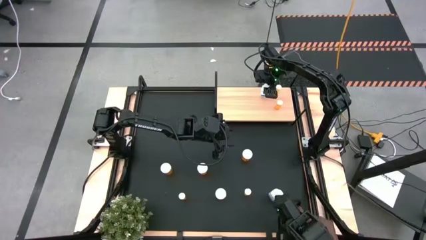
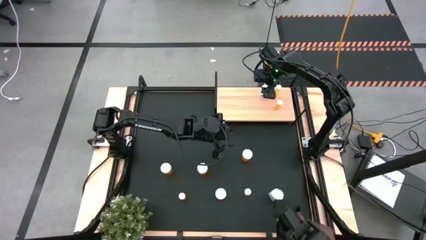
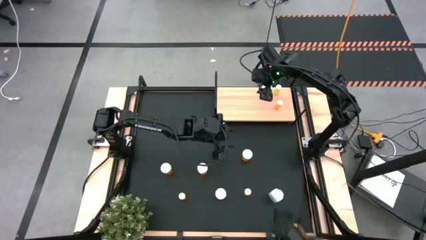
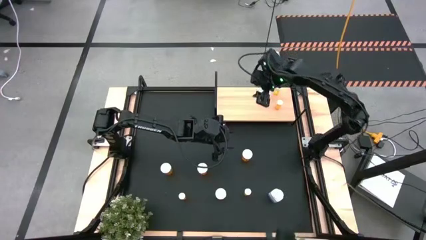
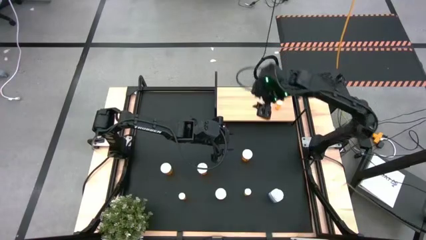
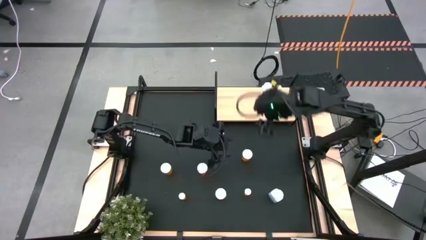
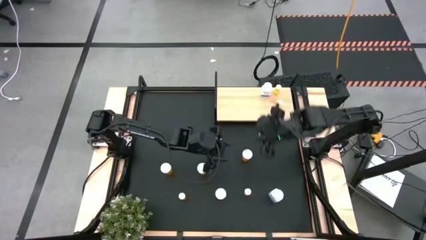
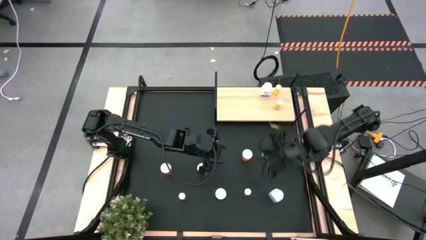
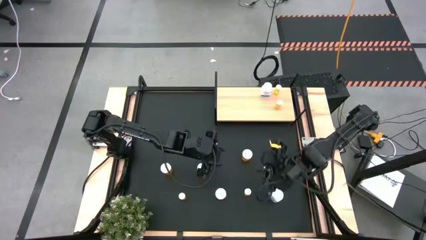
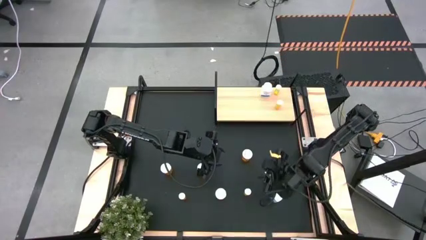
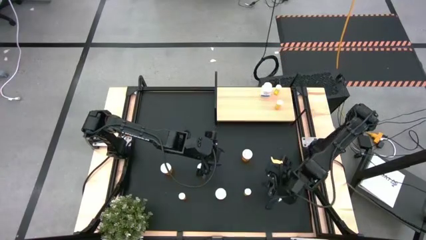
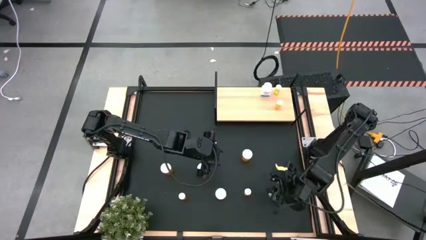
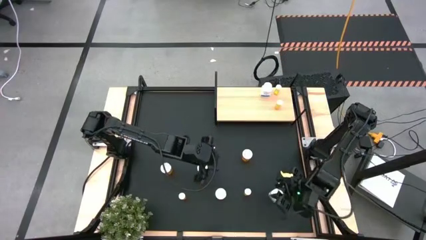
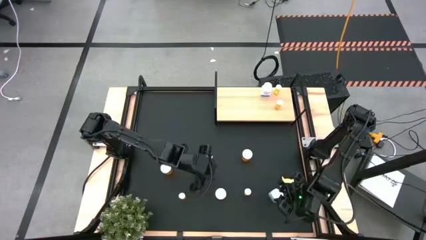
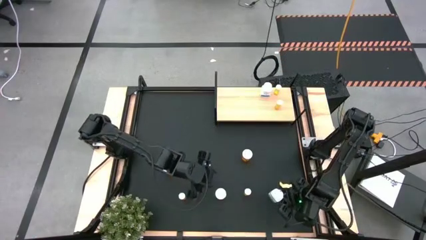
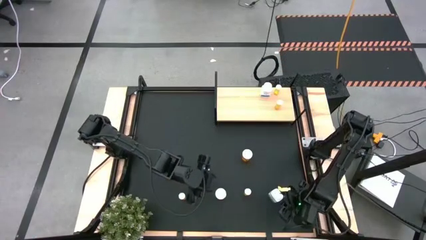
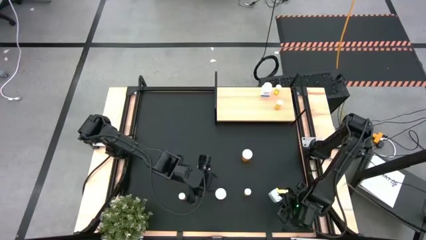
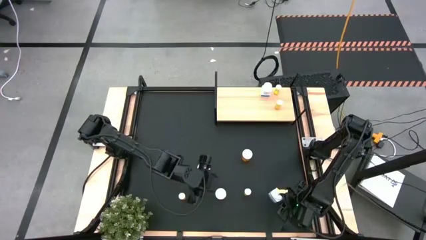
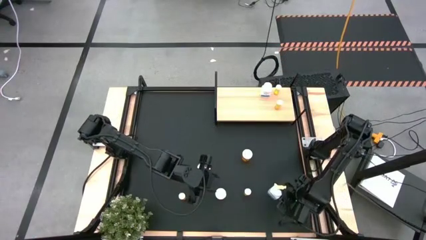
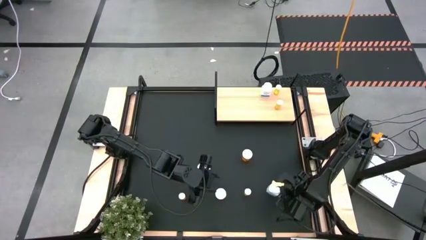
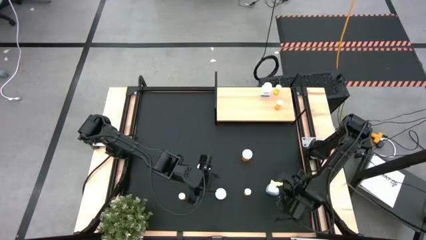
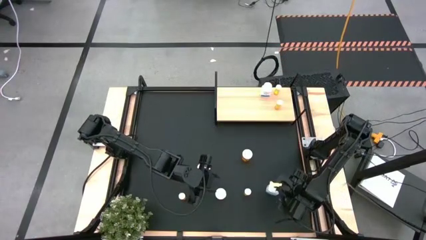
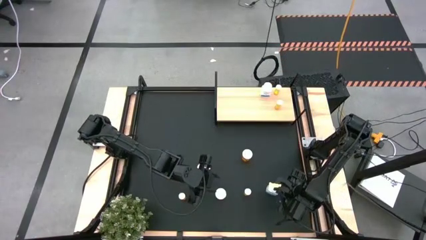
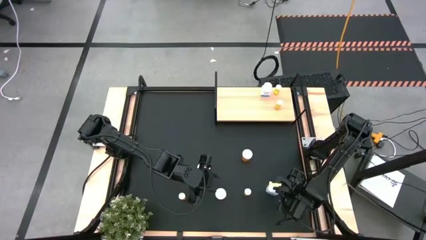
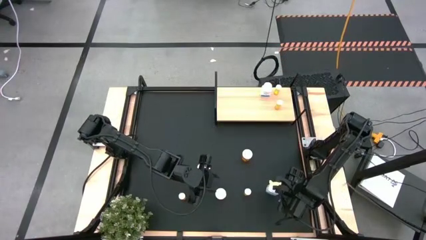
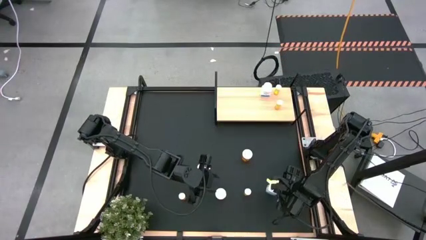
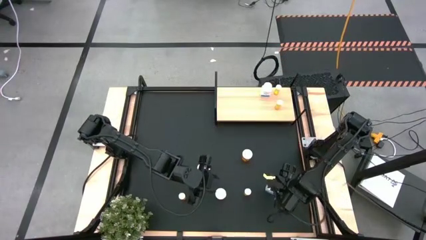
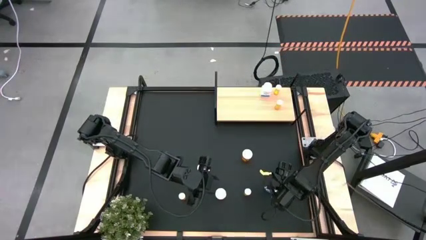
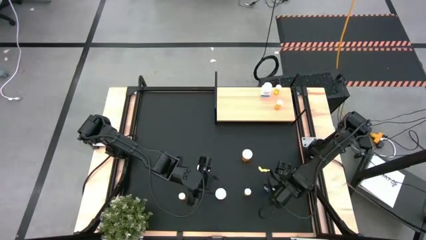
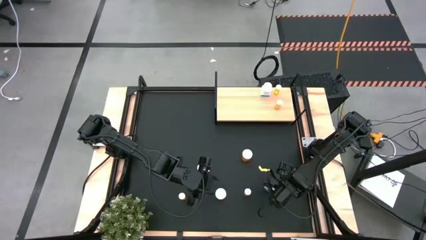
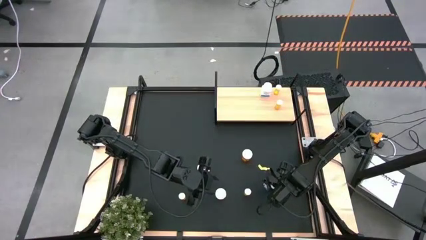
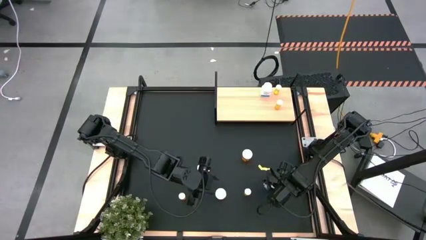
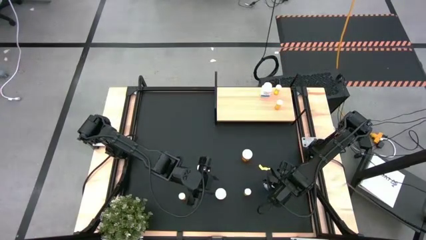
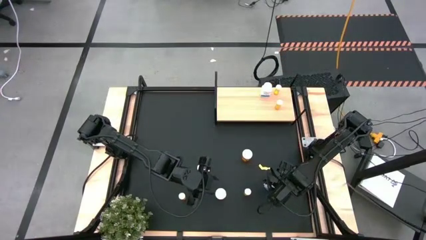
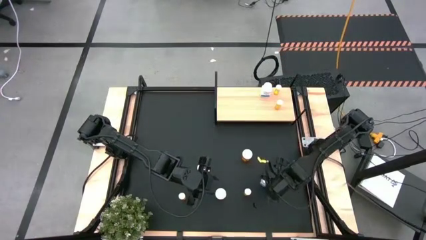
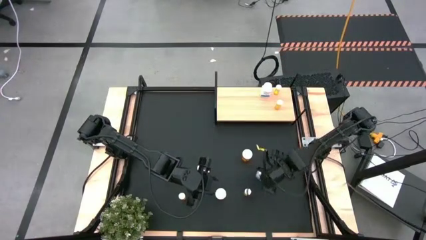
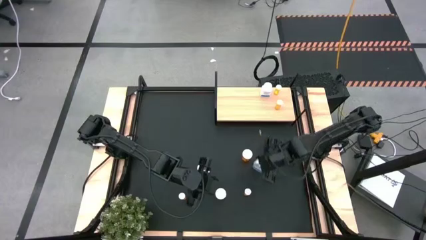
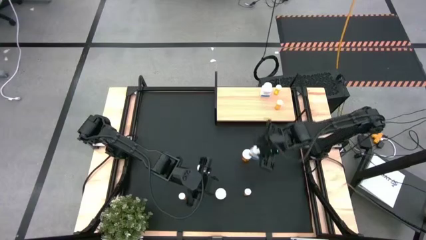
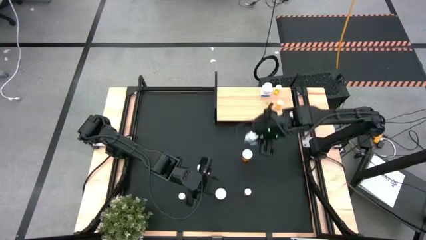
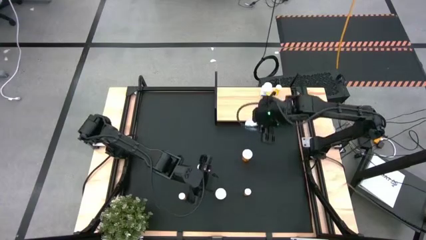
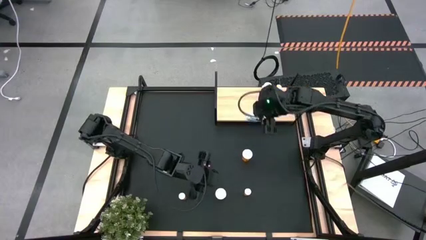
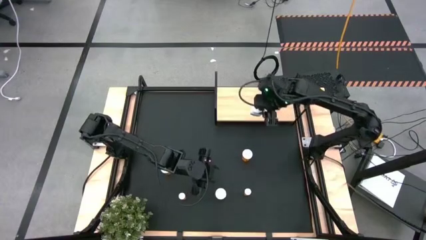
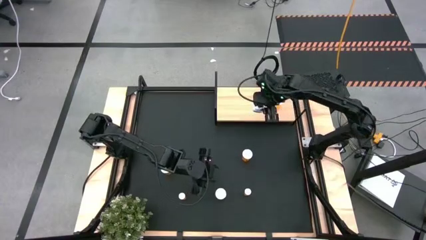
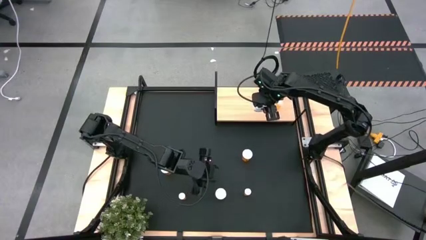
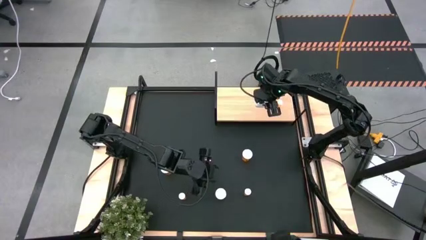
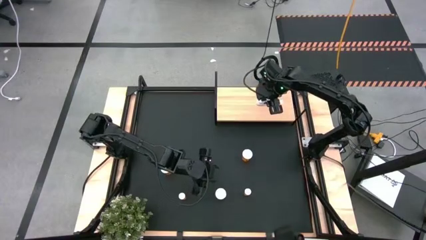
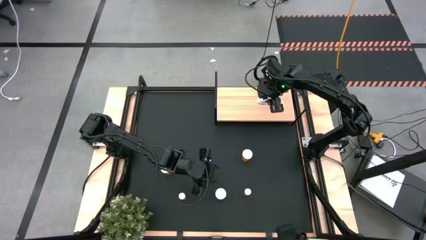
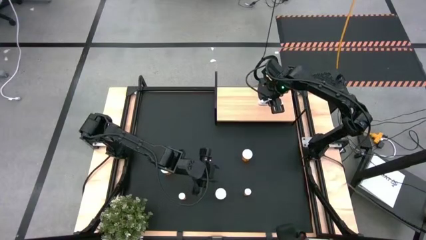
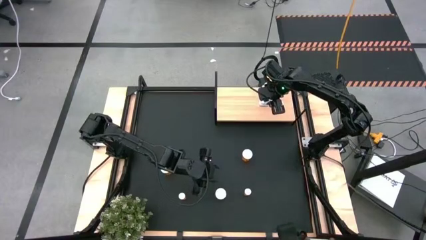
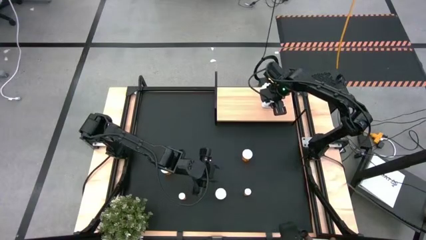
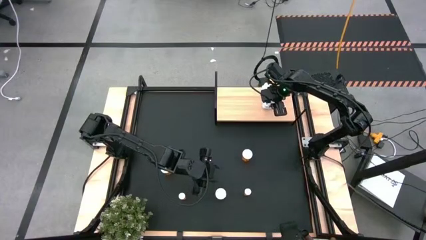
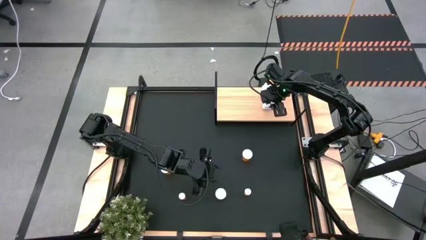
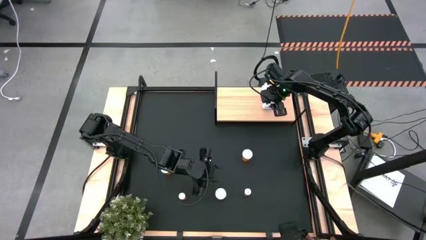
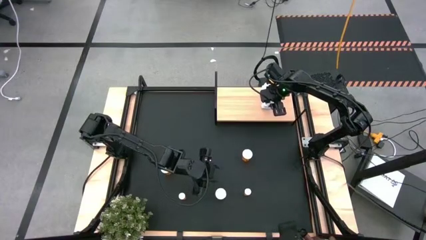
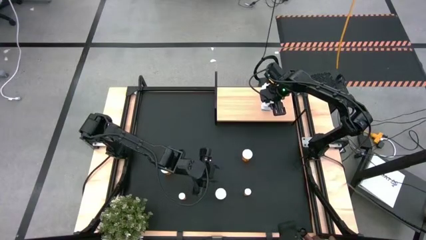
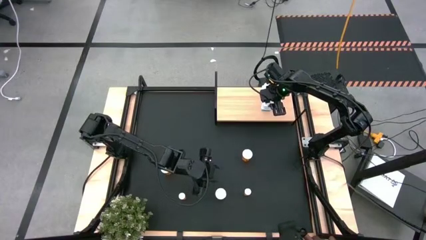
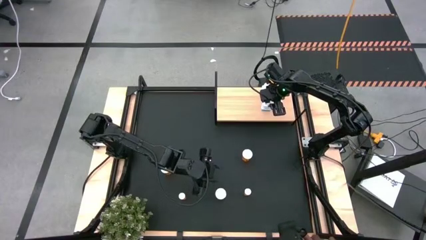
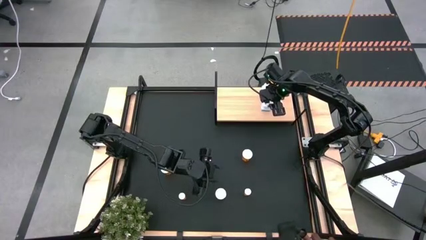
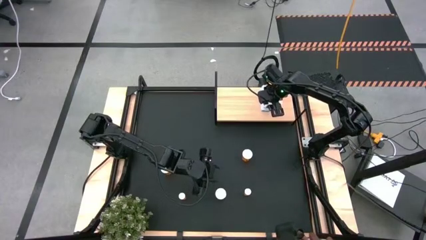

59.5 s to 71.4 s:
Task: Pick and place medicine bottles onto shelf by color
Put the white pill bottle on the shelf aligned with the other white pill bottle
